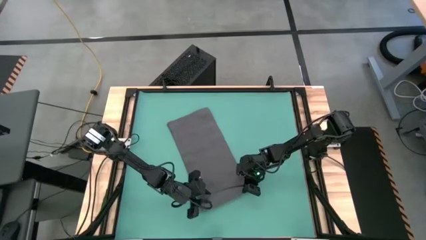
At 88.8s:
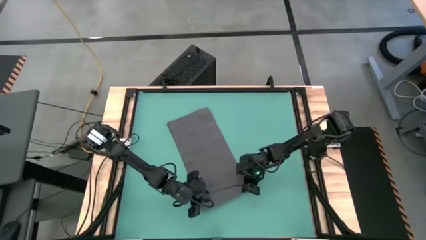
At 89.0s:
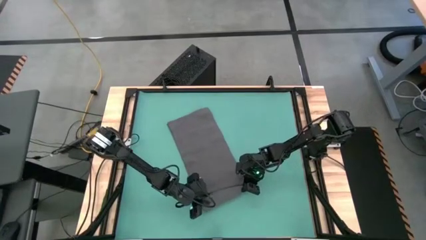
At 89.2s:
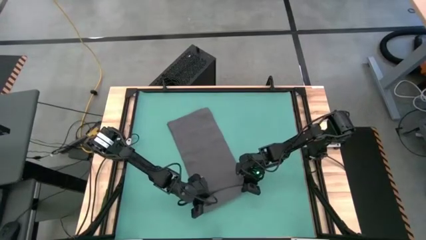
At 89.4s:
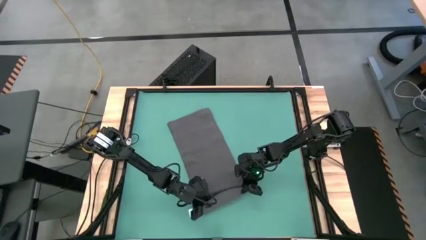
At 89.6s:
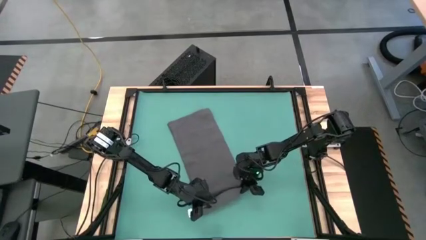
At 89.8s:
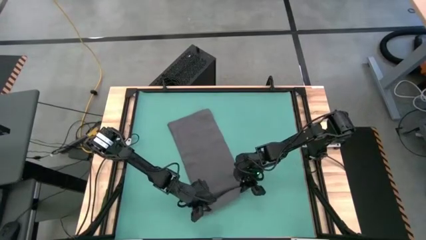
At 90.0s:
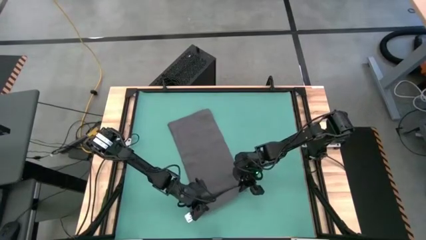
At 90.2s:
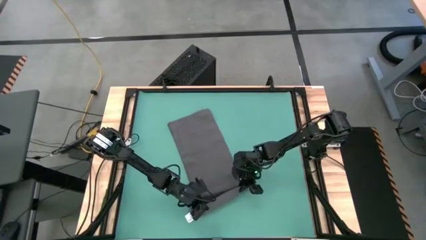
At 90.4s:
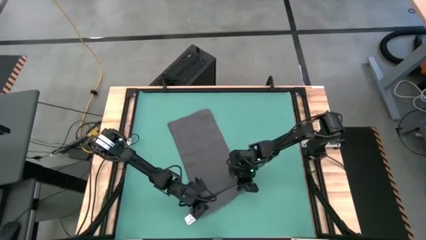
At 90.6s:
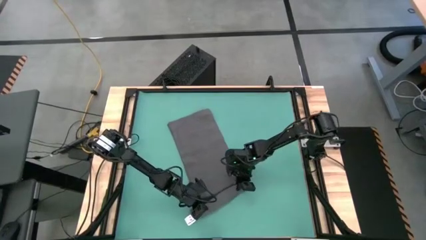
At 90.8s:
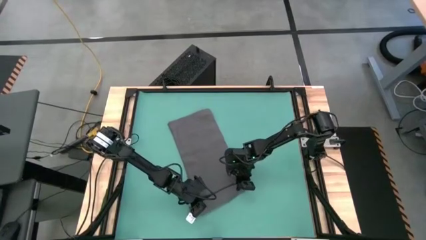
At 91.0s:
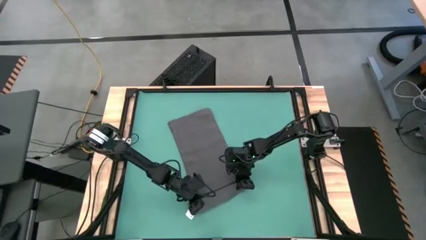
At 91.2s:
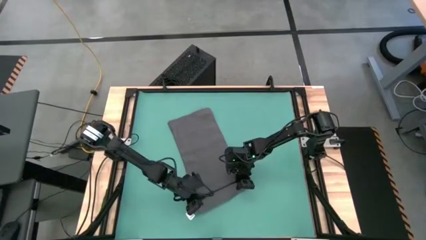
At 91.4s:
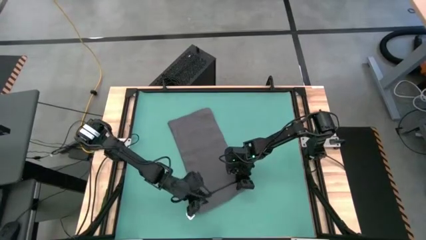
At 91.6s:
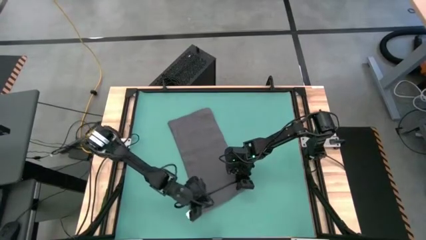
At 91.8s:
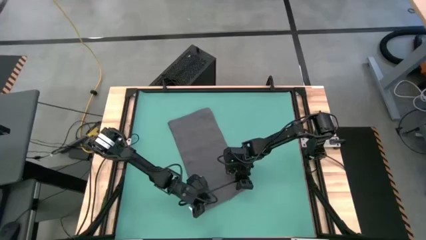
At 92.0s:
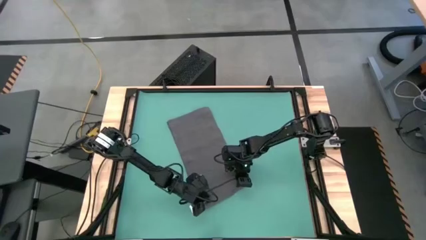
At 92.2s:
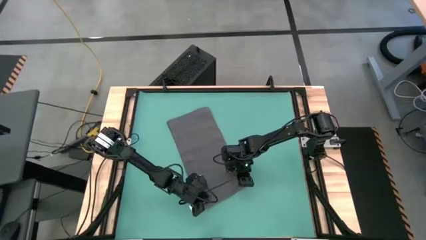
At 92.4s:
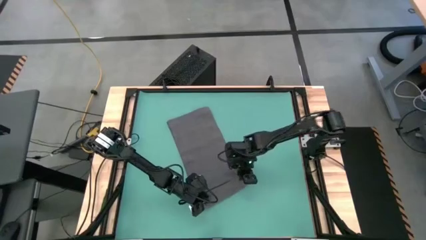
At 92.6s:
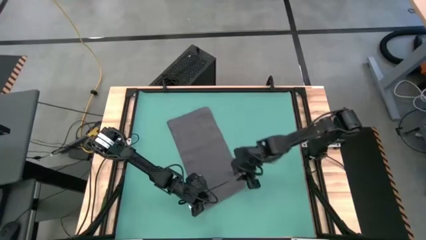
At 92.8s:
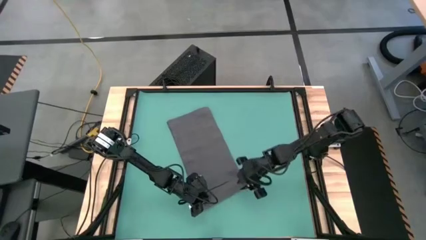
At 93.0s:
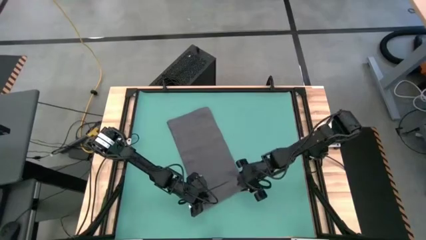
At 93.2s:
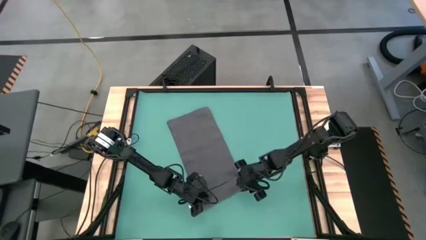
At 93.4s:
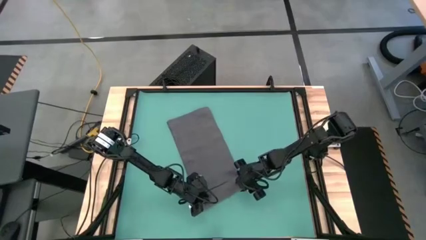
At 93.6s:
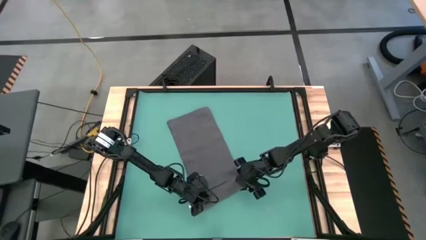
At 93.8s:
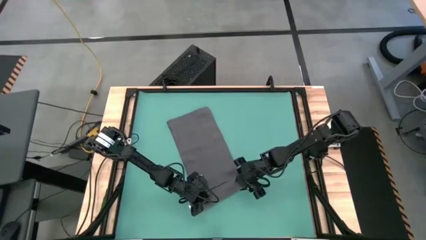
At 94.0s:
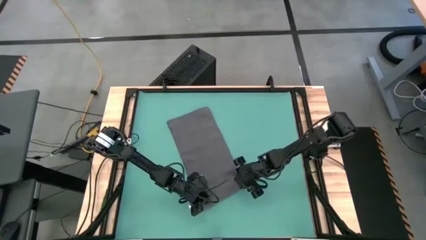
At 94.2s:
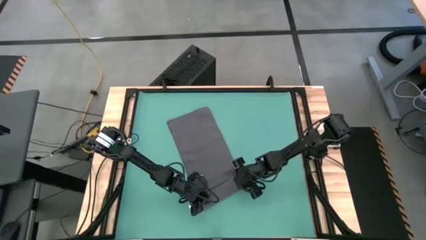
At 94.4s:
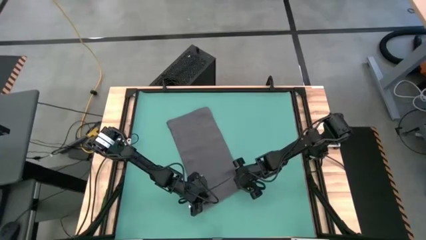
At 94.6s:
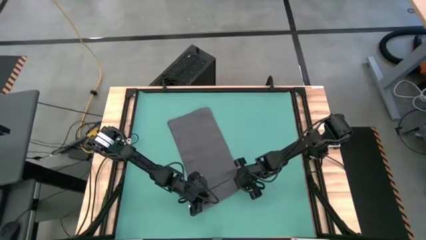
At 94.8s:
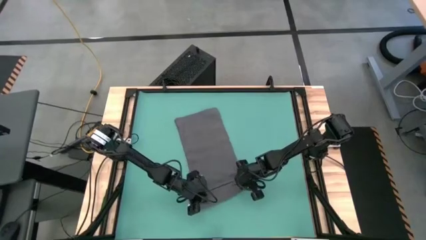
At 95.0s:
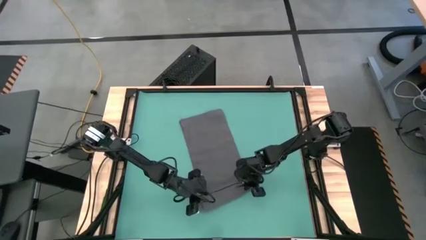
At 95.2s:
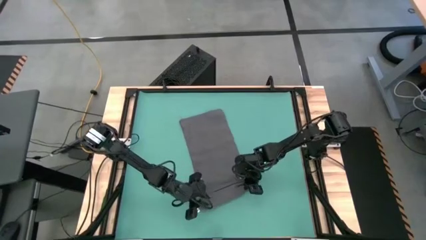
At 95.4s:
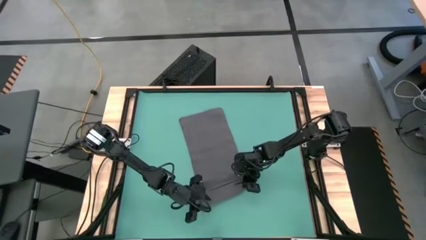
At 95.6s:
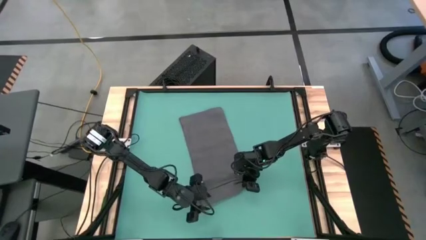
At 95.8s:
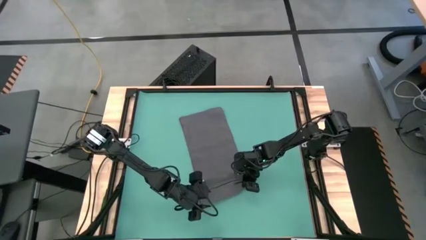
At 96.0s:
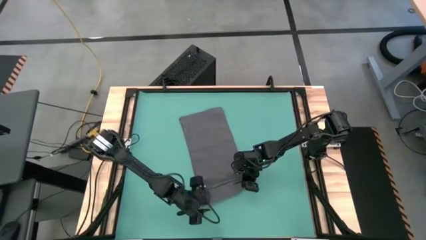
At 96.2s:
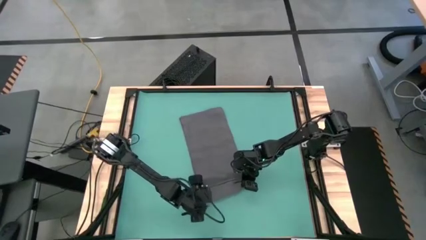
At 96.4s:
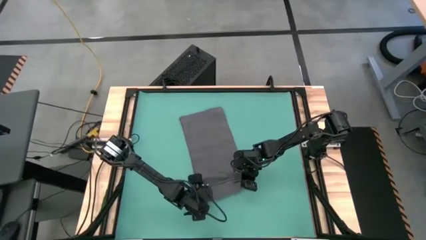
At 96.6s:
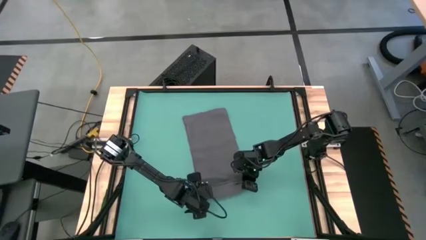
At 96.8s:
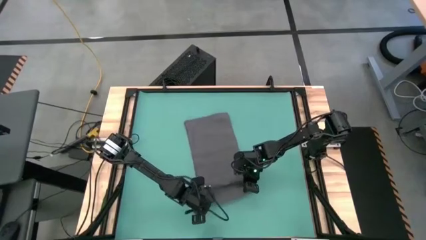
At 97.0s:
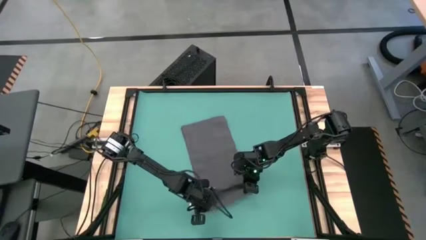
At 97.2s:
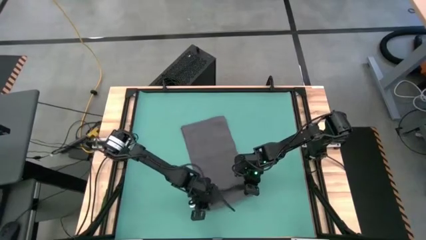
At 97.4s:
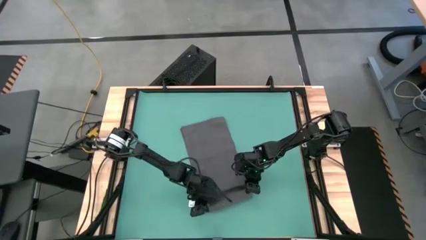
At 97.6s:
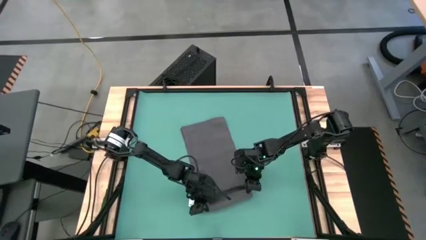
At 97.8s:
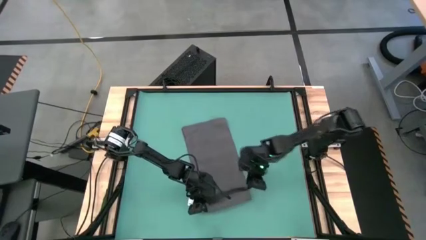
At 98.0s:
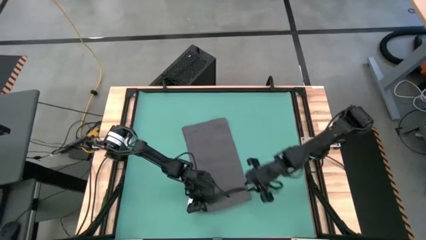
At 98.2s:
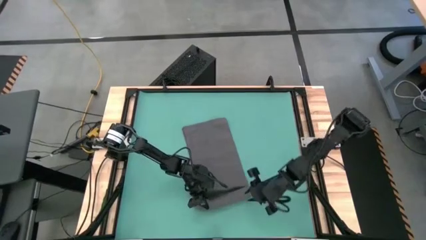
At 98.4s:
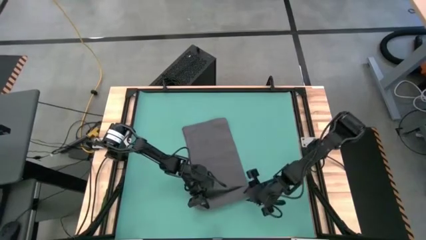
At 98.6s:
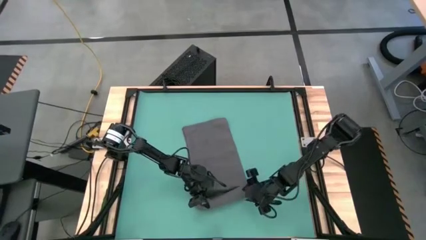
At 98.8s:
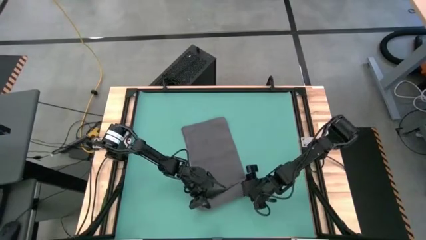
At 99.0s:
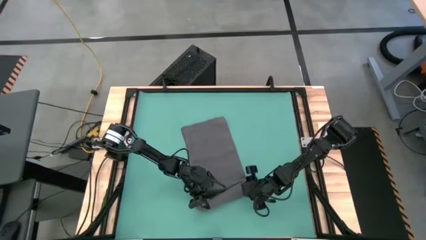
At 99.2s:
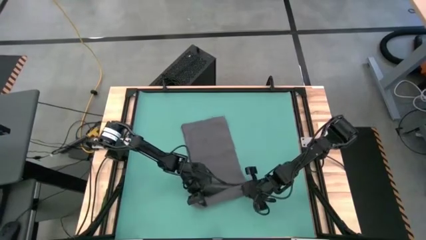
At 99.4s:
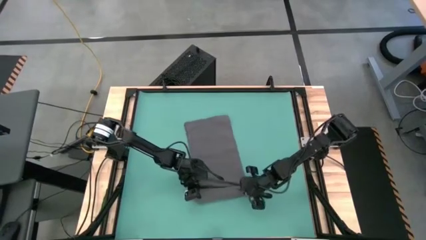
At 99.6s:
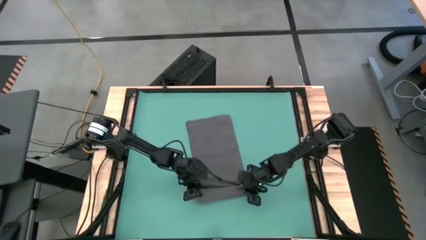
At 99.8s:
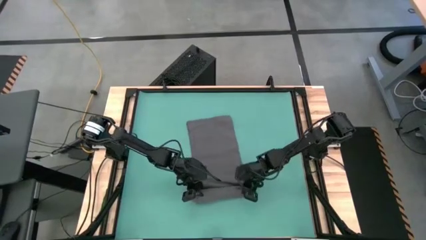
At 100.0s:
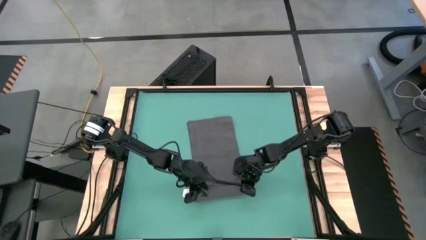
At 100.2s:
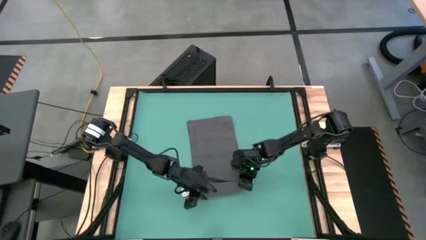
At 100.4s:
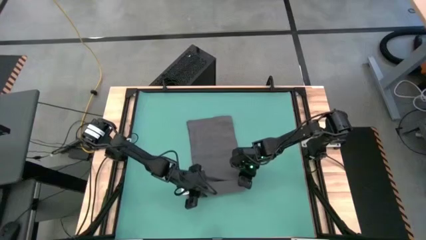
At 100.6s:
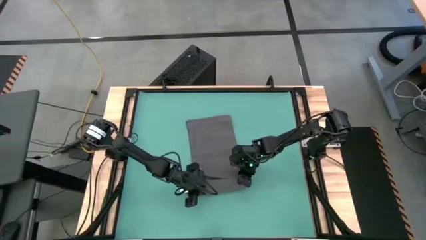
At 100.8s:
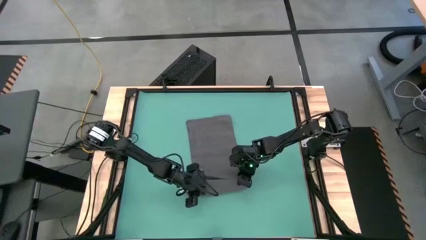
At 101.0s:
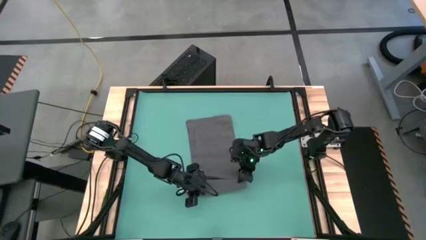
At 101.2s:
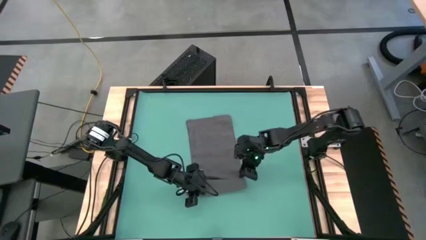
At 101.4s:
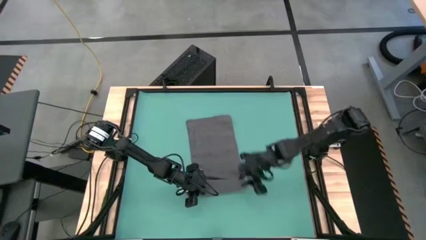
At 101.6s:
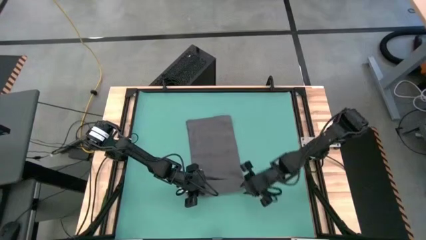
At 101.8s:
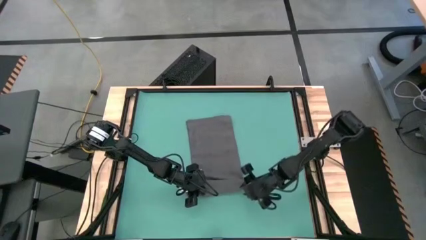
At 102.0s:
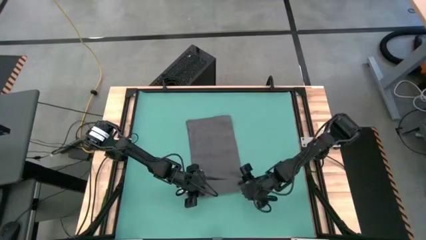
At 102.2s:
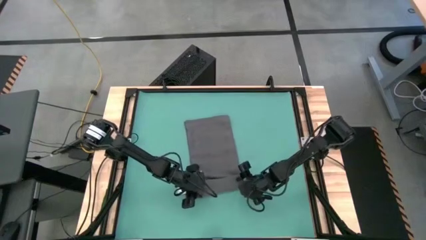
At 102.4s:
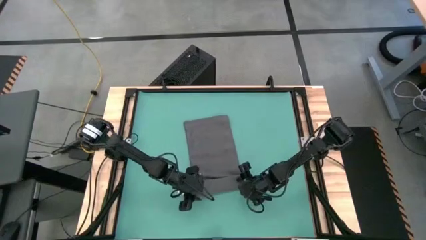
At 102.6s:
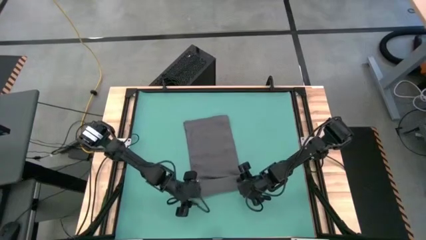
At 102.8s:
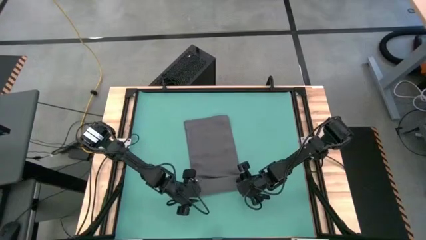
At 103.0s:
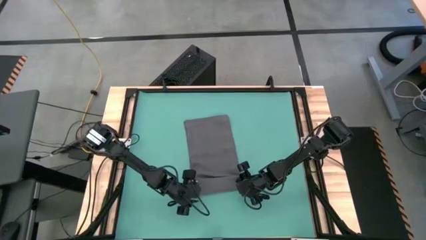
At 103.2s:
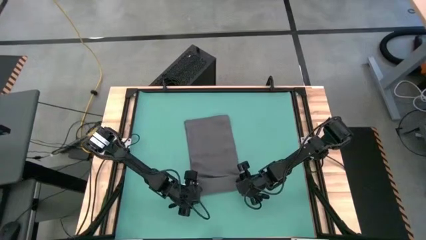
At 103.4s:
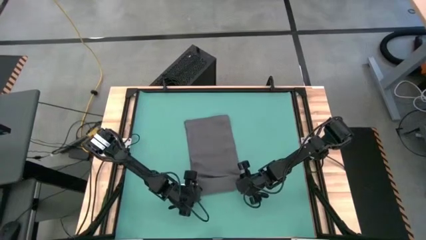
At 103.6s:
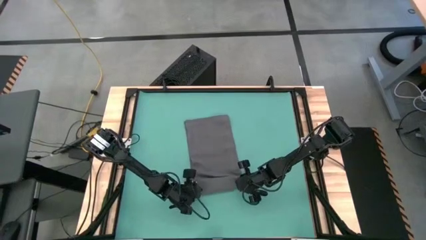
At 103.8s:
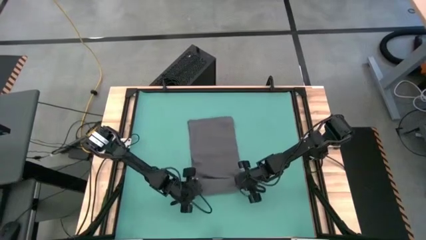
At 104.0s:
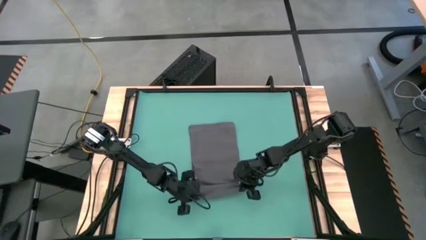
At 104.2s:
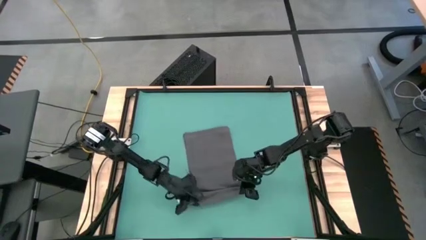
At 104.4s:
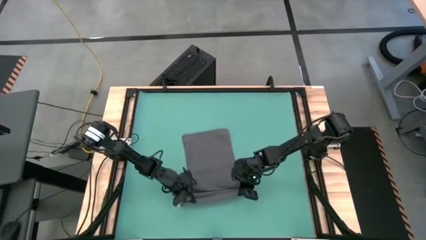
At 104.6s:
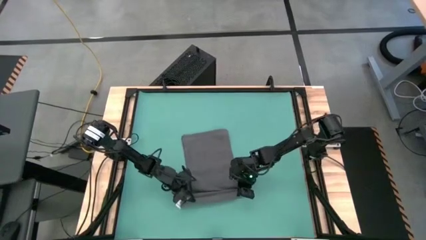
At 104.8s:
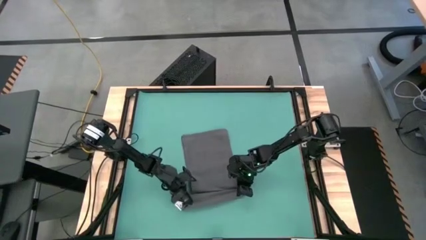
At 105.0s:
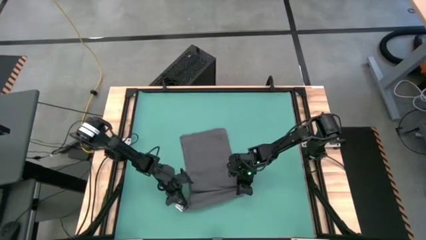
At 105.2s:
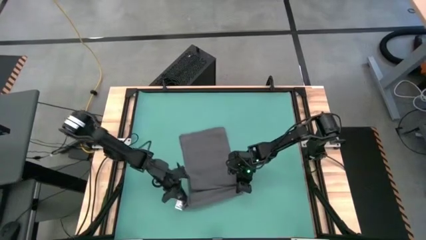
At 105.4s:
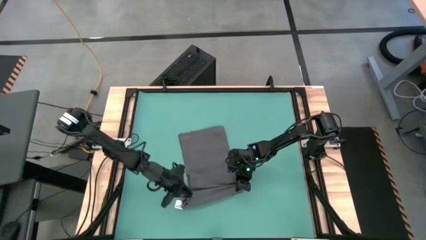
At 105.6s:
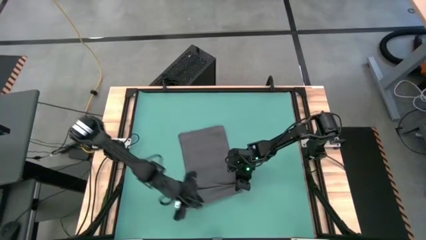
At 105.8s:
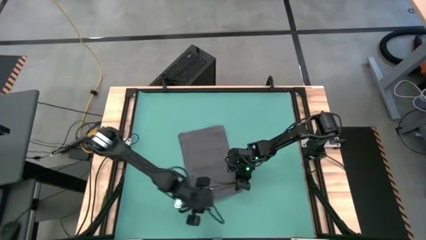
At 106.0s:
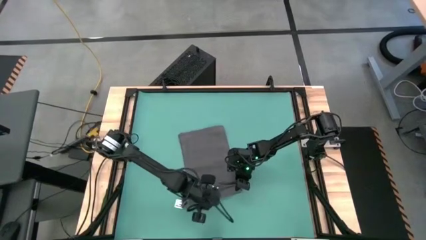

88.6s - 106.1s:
Task: Roll towel into tight, uniform cylinder
Roll the gray towel
